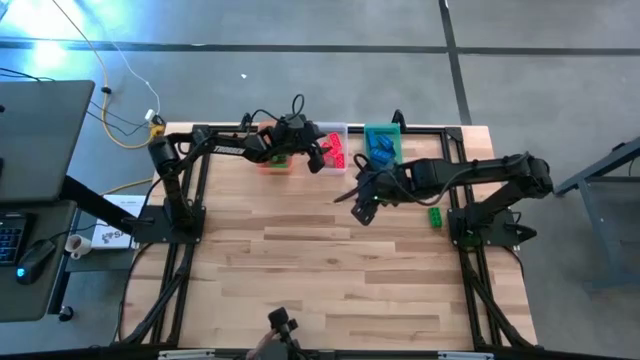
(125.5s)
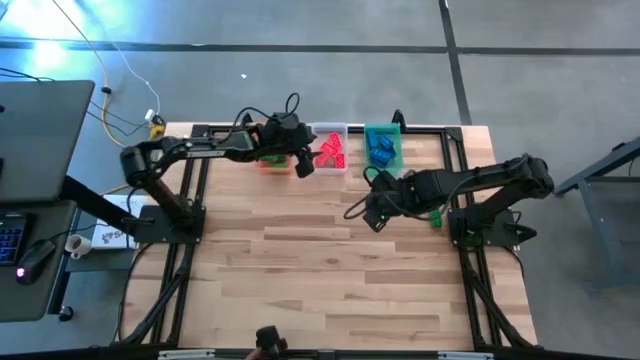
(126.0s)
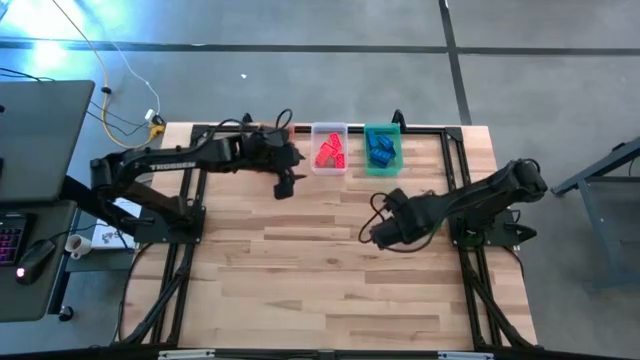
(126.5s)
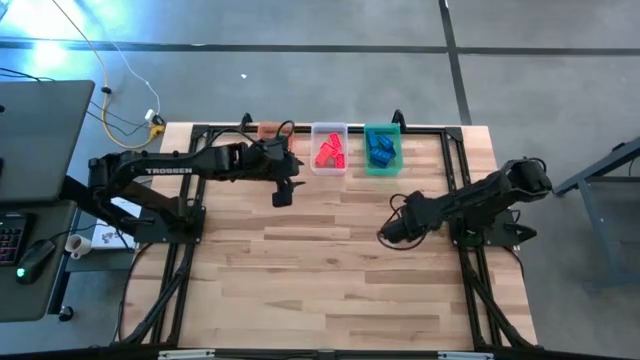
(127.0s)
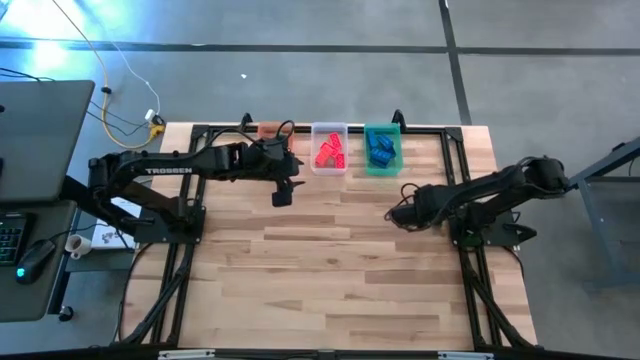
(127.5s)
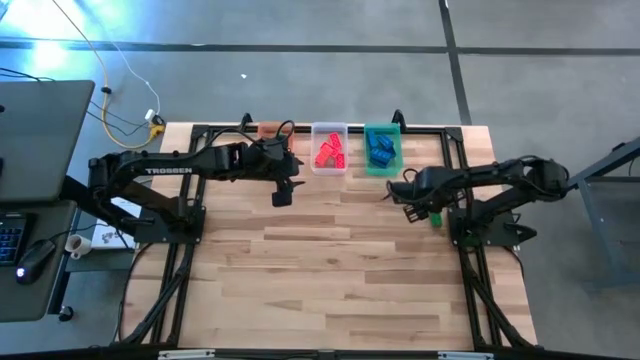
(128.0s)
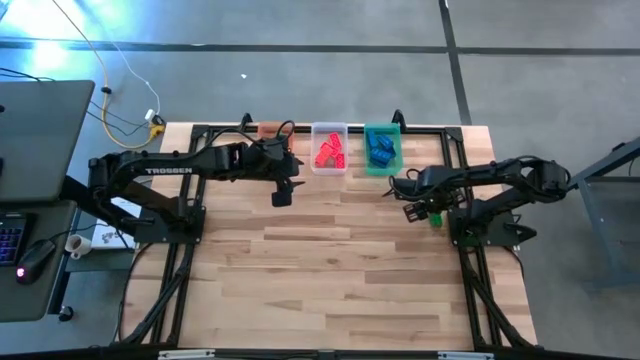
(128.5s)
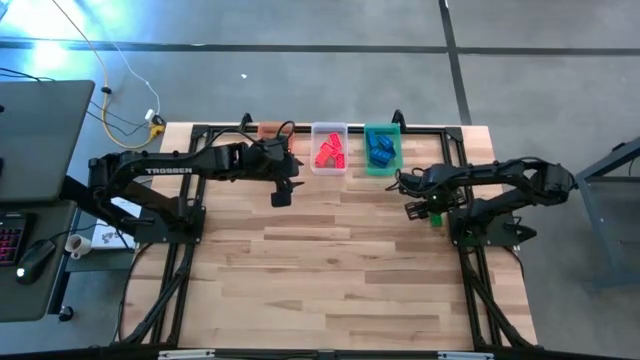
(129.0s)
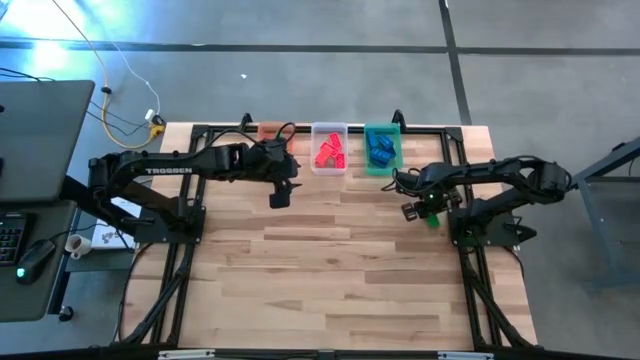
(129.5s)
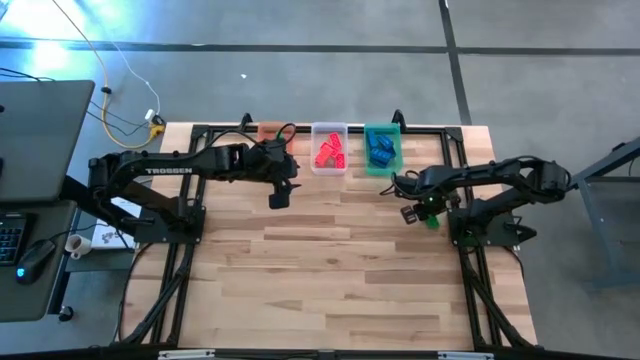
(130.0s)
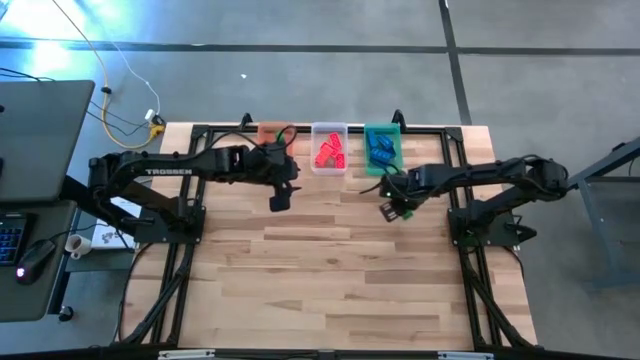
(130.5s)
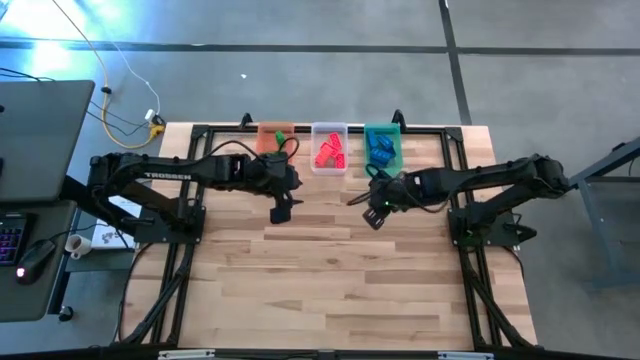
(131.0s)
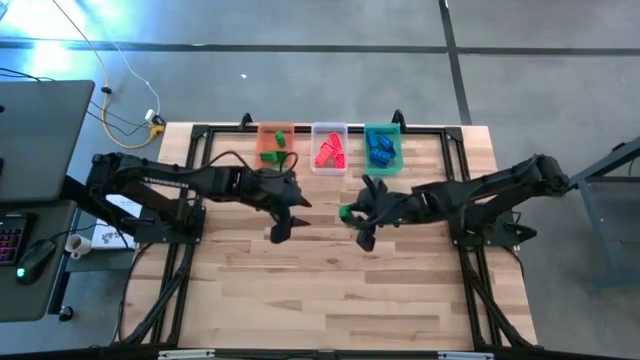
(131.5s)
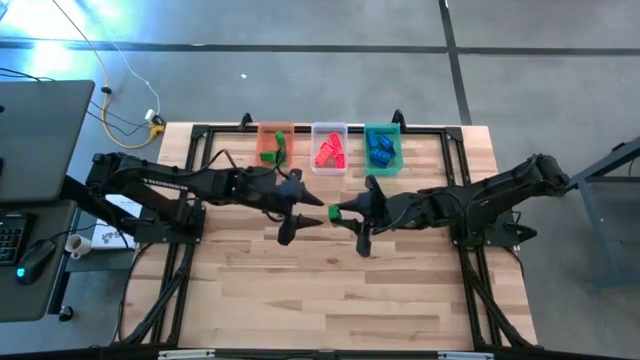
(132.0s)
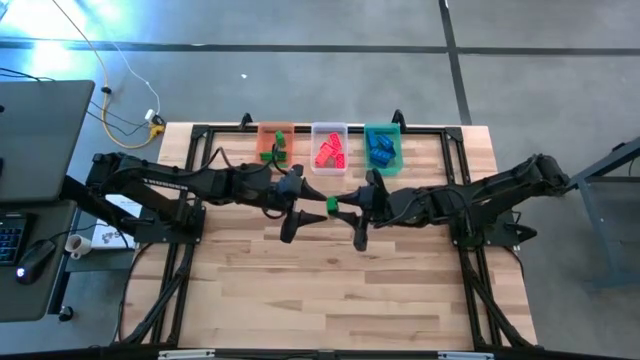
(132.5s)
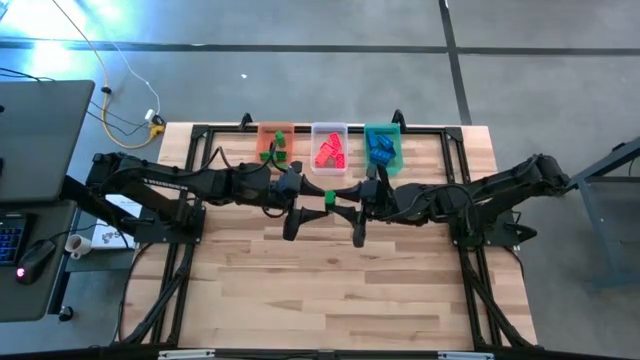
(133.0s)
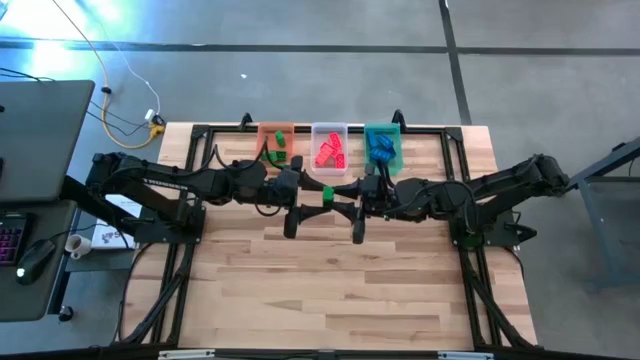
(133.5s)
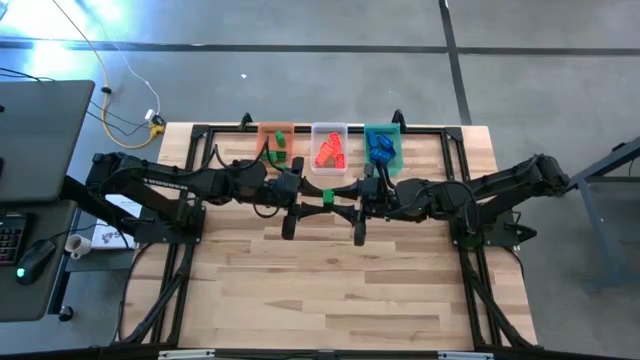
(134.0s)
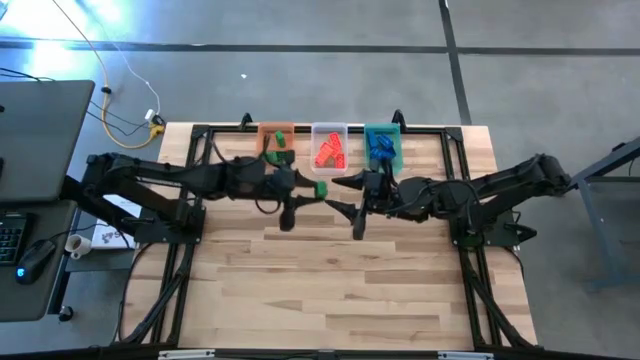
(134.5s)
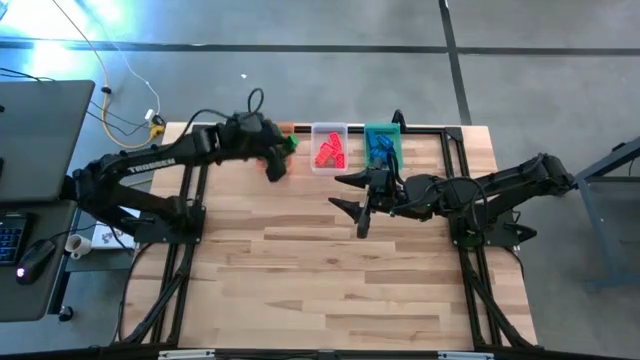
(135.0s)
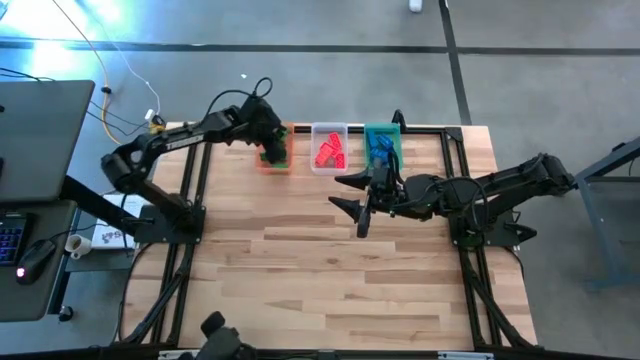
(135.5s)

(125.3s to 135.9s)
Task: Sort & place blocks by color
Put the green game piece into the orange bin

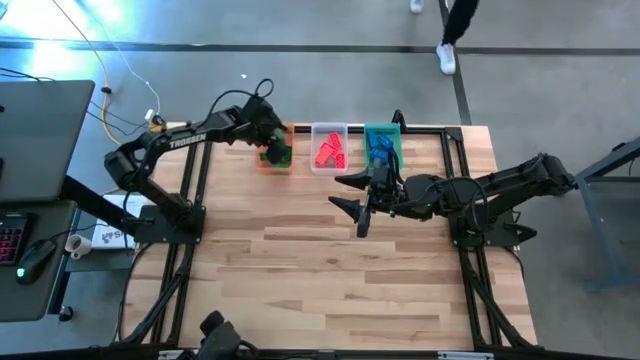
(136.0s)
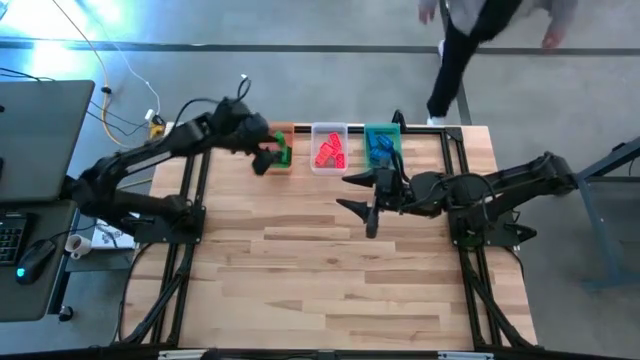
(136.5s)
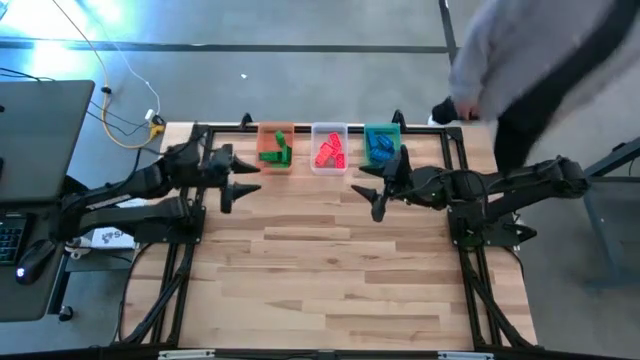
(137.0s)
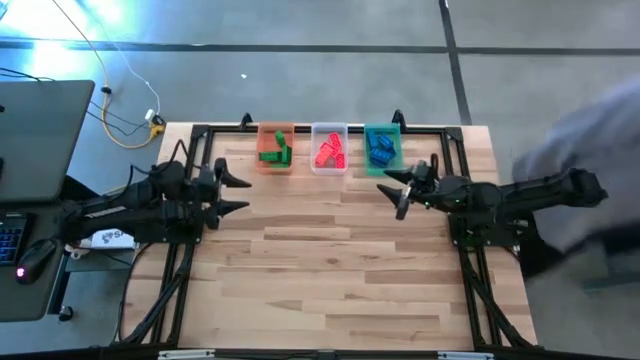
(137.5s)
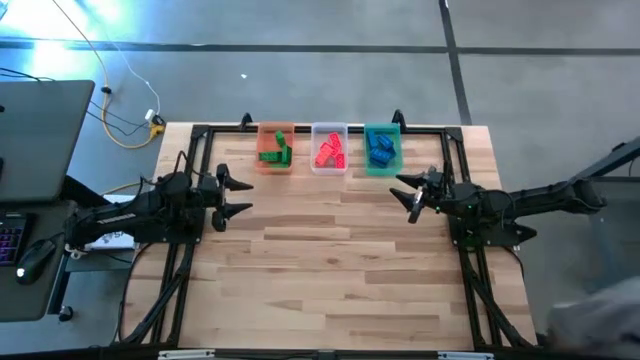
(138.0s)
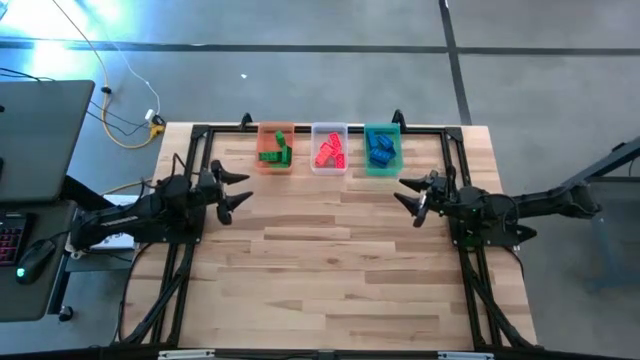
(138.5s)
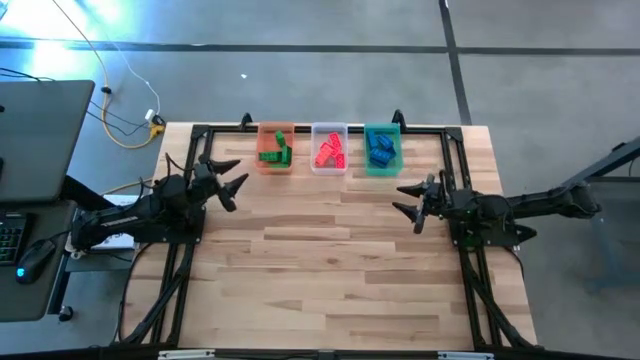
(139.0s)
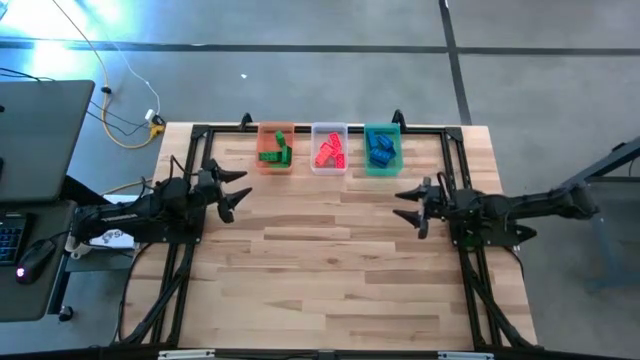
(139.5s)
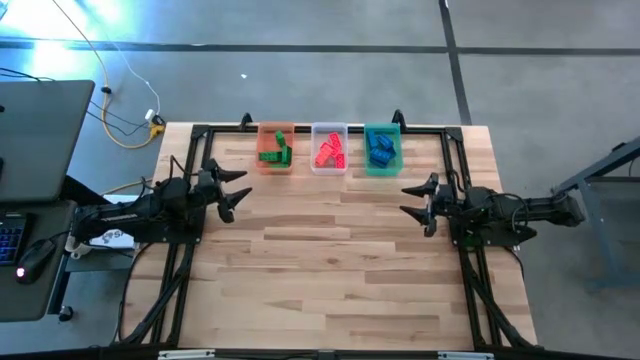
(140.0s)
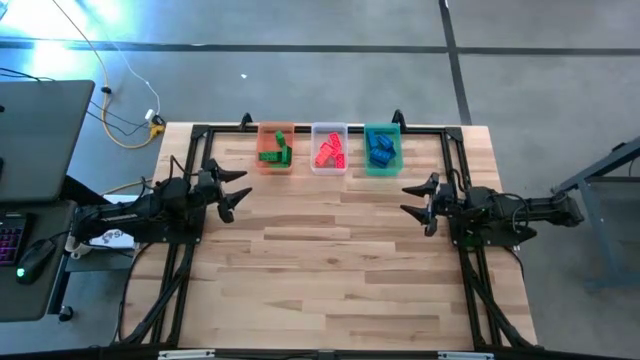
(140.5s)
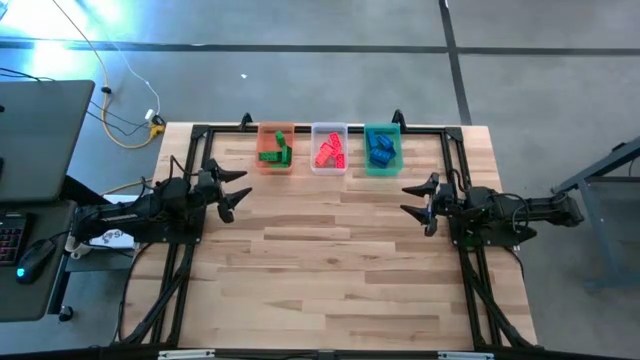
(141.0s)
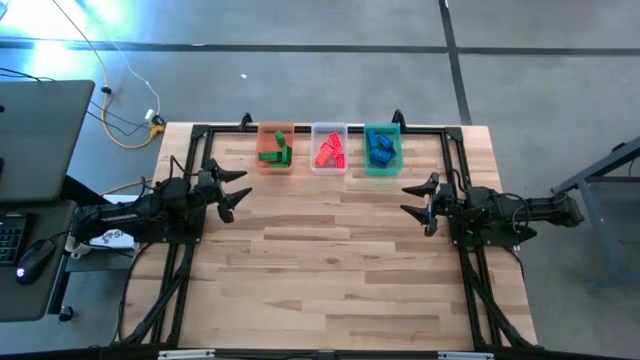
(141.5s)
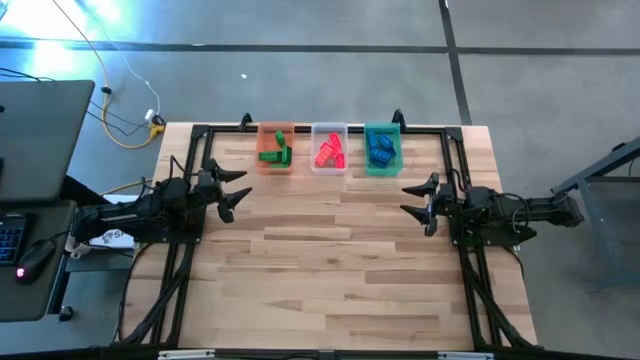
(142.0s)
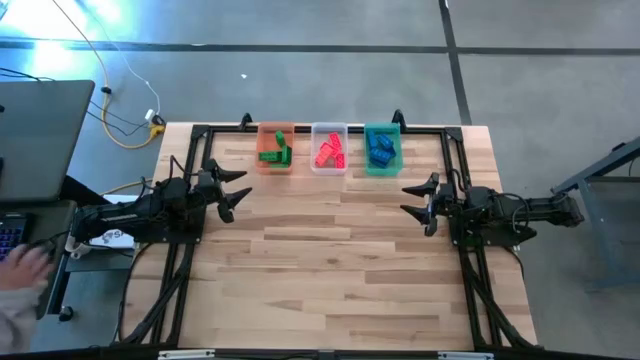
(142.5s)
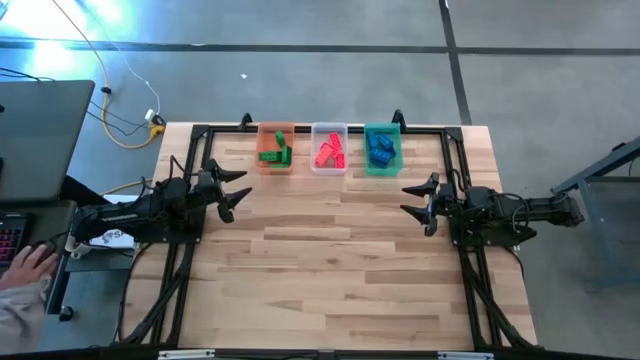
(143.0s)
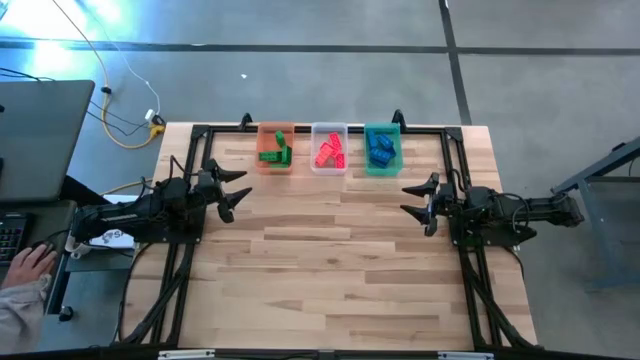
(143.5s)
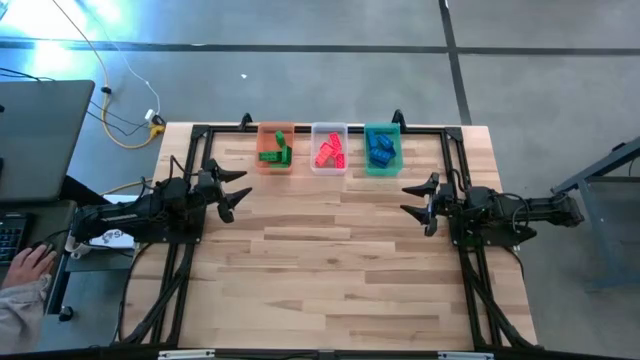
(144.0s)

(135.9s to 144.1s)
Return to Home Position
